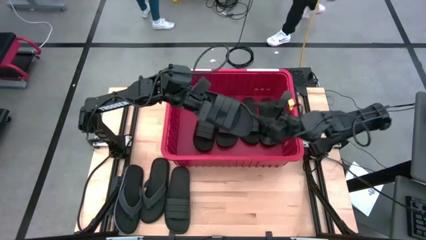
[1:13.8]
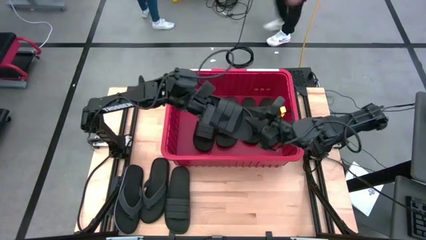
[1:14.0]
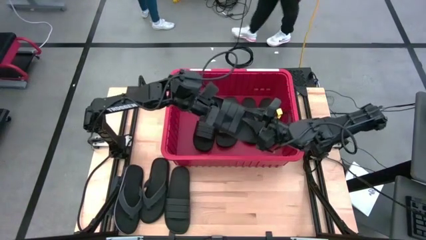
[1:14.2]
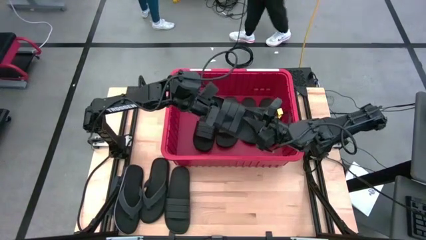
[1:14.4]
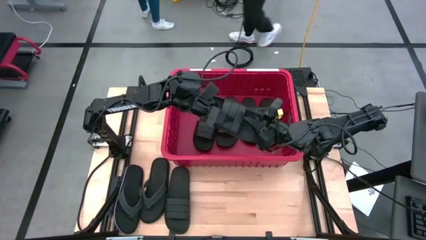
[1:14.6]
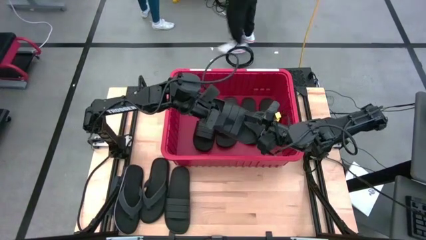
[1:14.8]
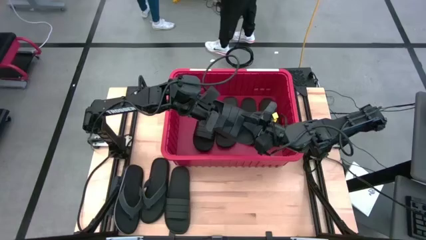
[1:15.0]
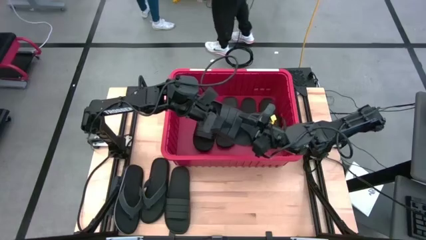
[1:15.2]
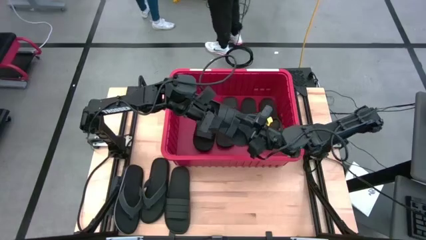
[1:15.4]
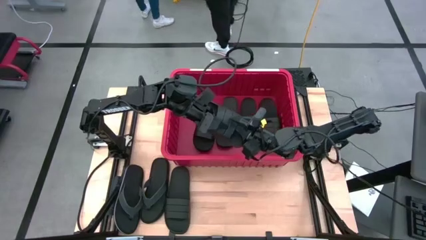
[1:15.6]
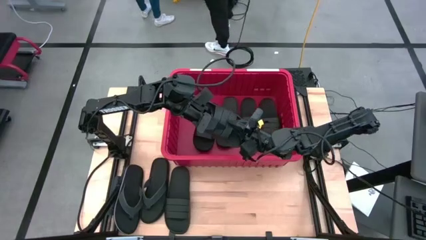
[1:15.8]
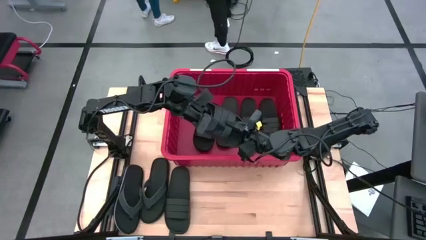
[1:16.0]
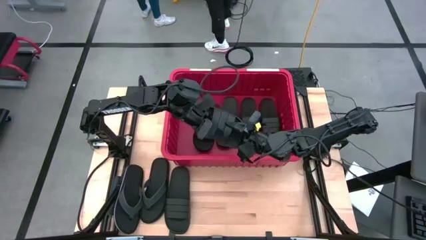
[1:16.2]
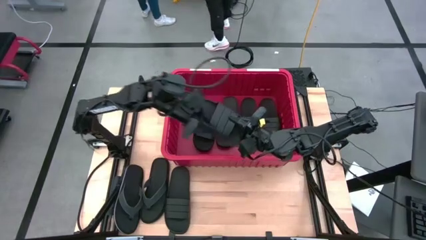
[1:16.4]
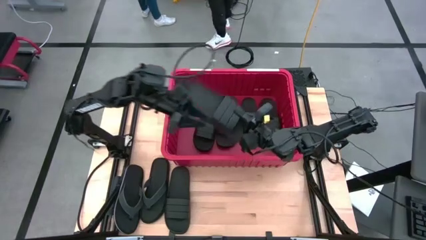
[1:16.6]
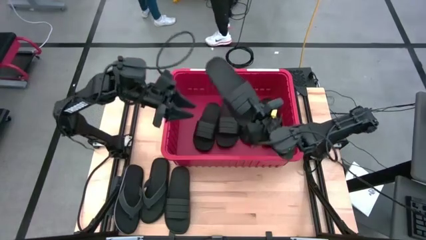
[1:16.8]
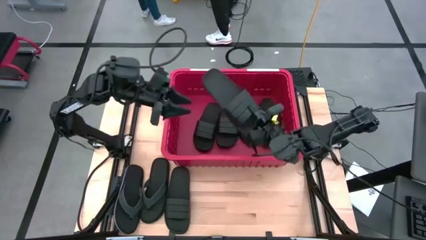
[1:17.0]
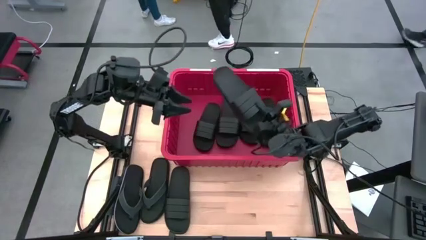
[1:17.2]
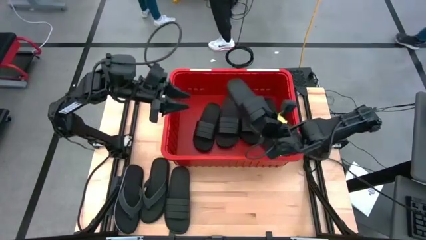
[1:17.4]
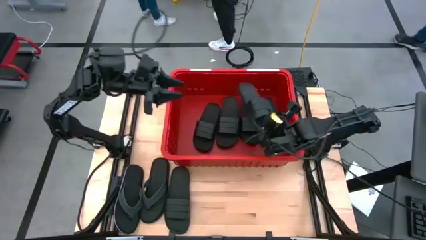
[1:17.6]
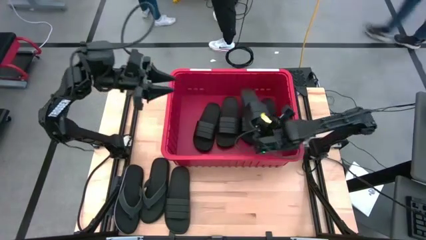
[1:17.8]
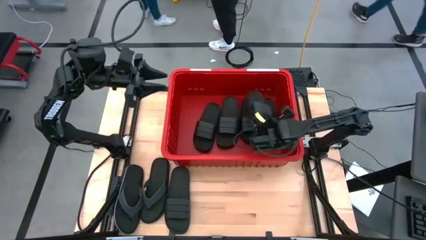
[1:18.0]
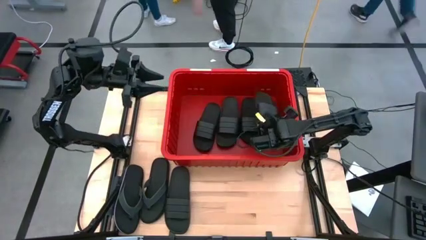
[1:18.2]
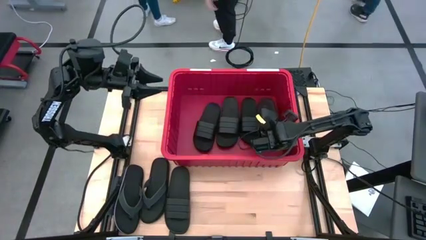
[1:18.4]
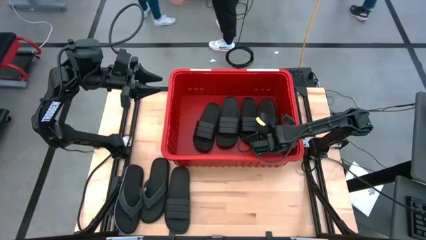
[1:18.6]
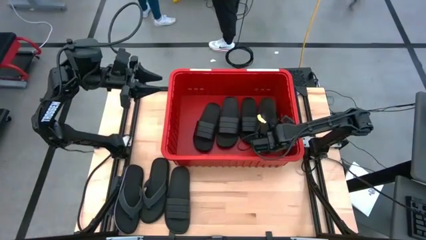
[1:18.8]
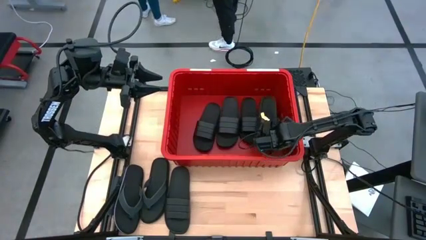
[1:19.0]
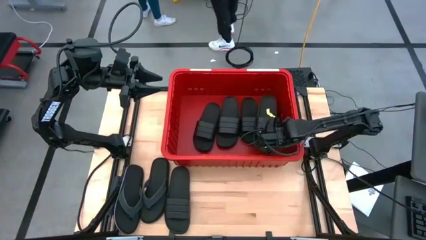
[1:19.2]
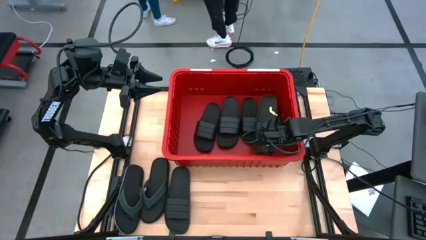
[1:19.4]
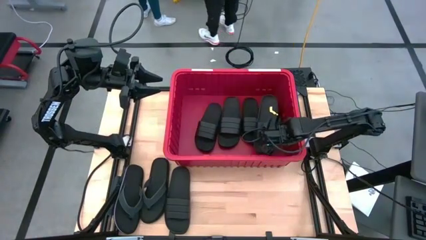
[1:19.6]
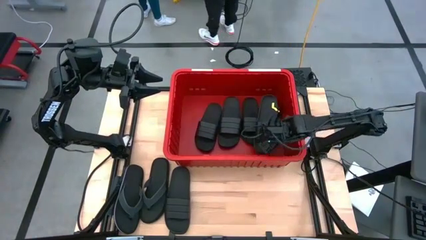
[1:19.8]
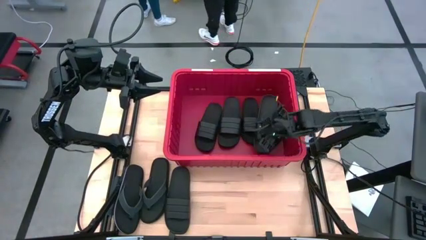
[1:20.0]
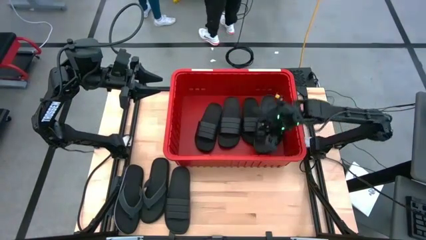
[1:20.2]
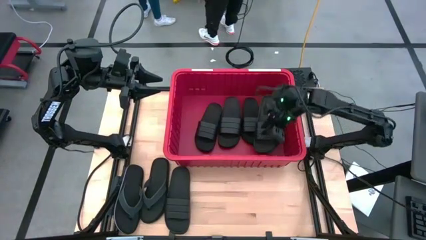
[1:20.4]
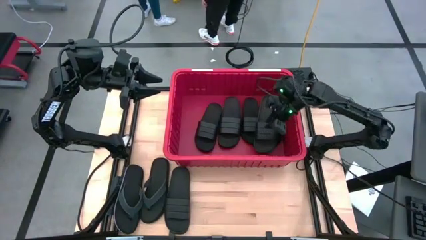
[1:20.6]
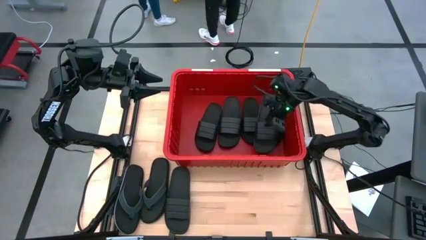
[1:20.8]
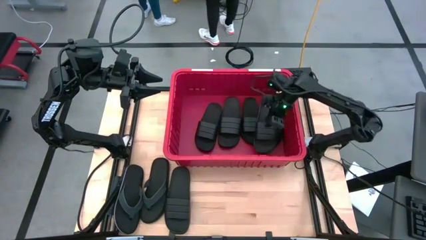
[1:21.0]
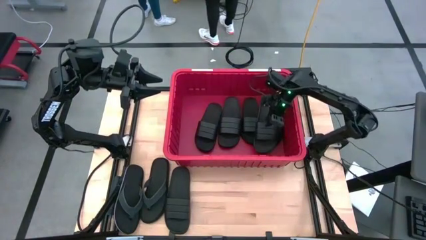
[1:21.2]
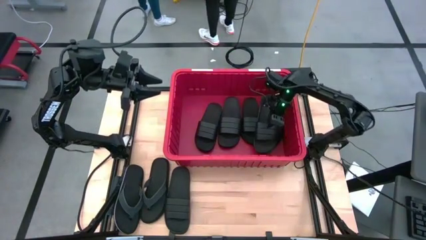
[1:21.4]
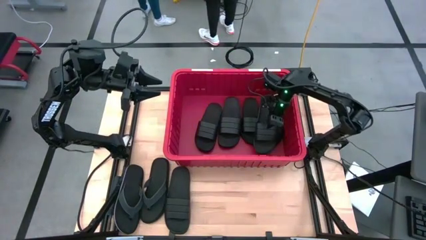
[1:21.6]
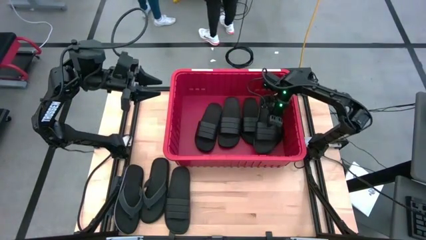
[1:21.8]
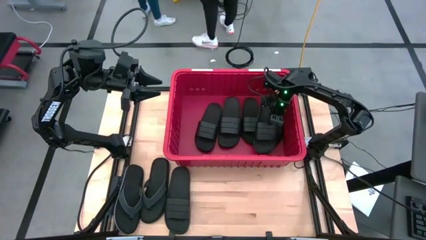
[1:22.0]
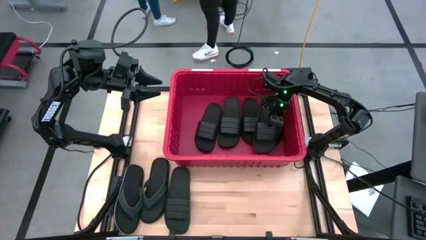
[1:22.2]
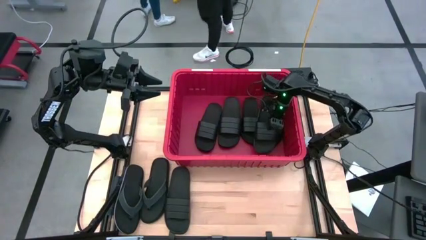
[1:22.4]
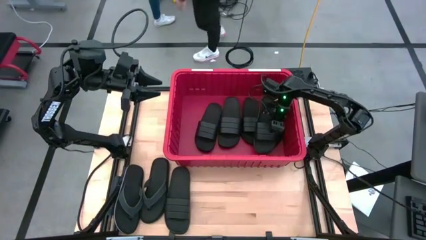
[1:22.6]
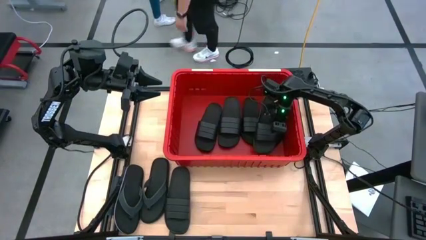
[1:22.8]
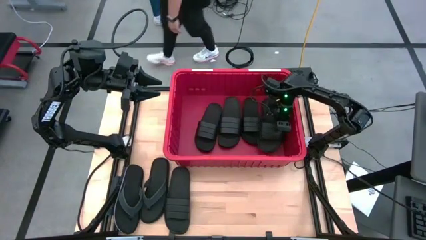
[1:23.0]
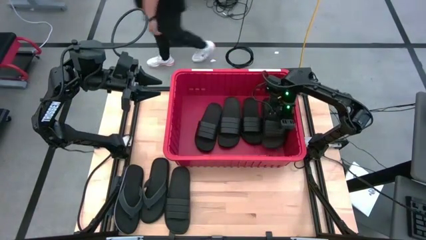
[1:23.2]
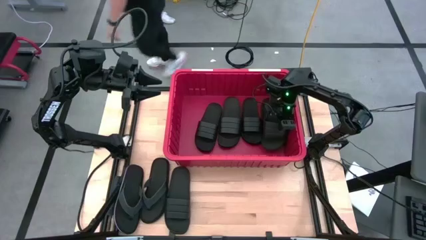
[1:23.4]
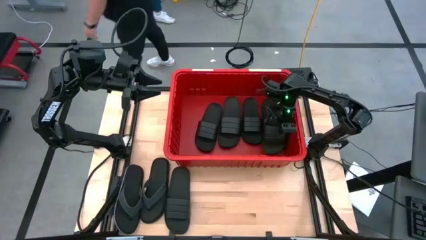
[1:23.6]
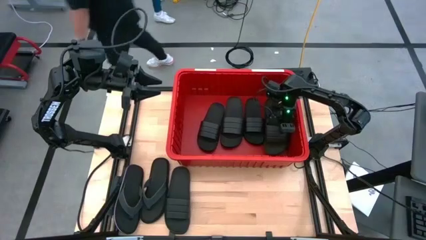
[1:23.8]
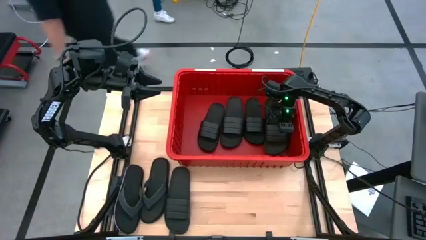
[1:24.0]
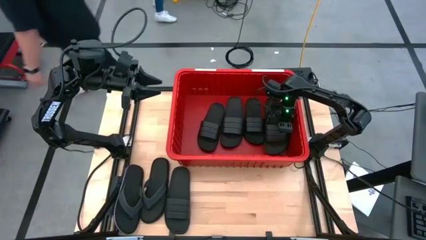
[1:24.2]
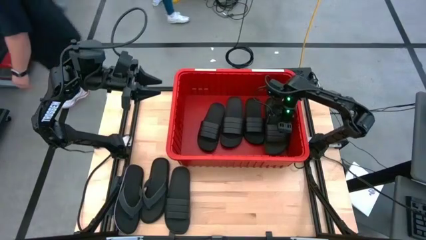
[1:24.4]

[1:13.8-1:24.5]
Task: Pick and place slides into bin
Put the black slide into the red container

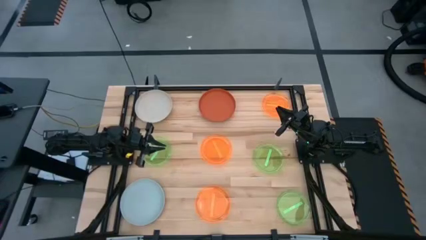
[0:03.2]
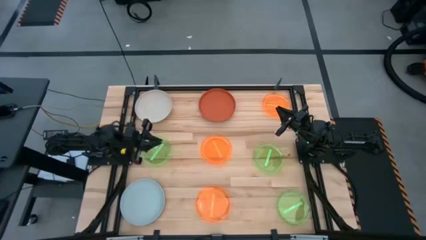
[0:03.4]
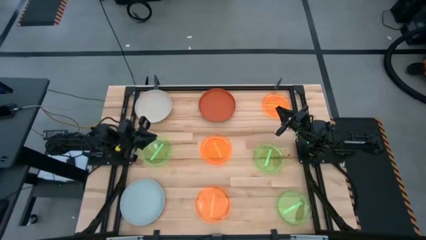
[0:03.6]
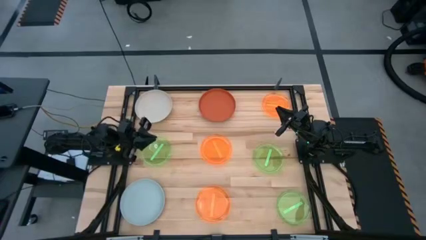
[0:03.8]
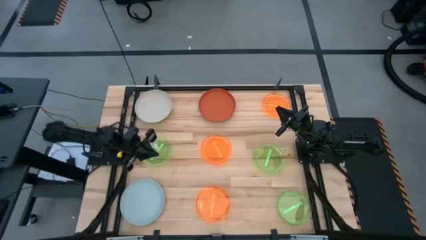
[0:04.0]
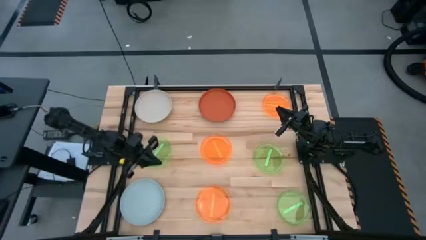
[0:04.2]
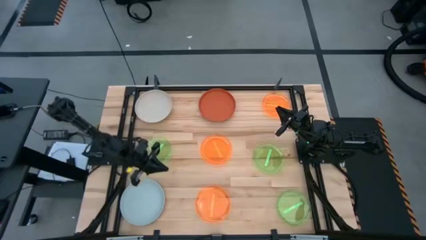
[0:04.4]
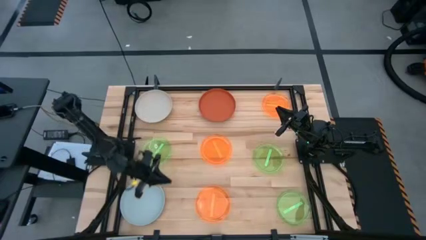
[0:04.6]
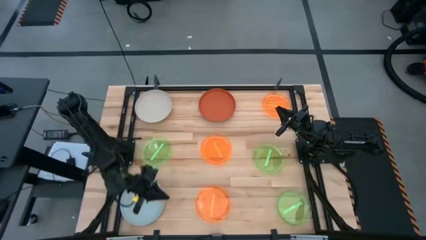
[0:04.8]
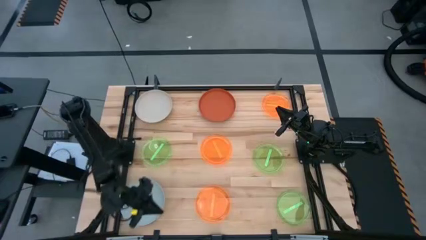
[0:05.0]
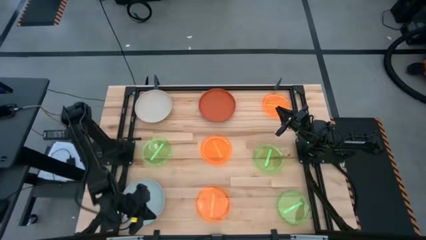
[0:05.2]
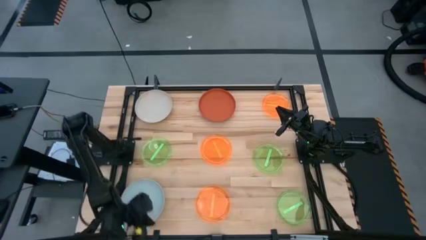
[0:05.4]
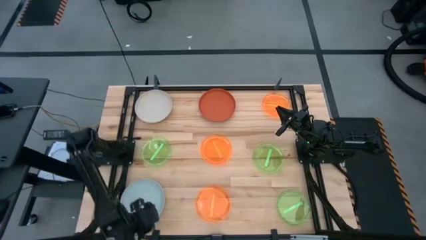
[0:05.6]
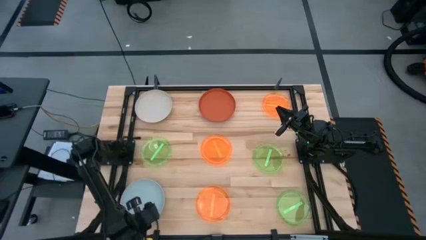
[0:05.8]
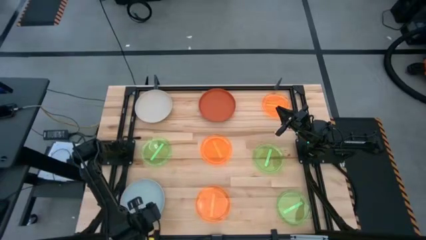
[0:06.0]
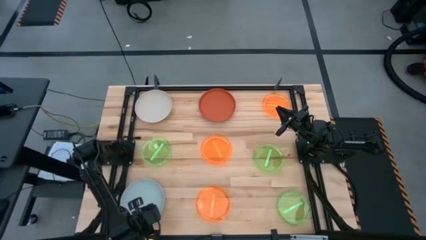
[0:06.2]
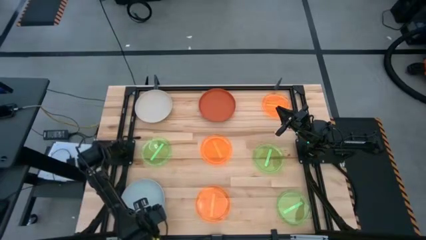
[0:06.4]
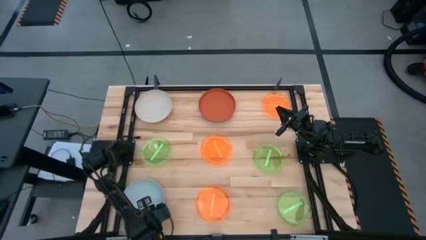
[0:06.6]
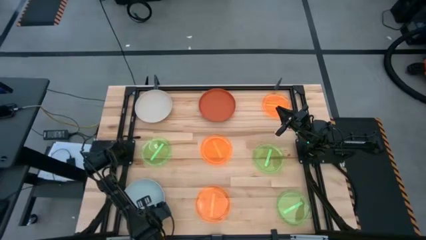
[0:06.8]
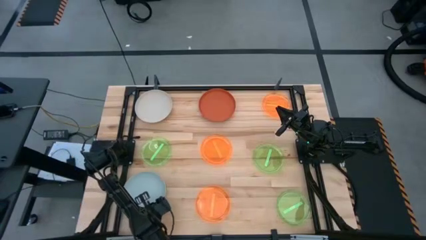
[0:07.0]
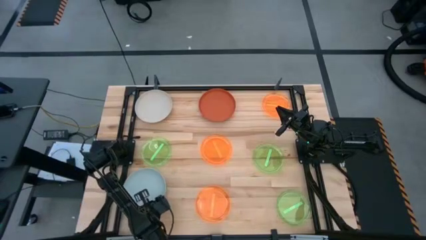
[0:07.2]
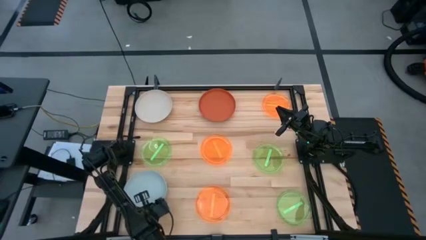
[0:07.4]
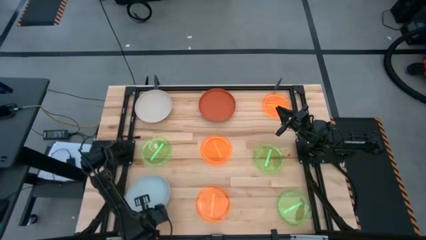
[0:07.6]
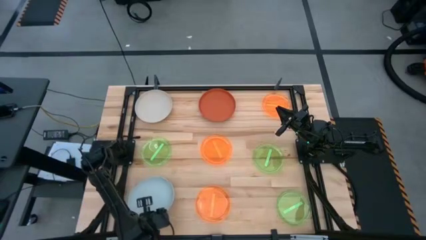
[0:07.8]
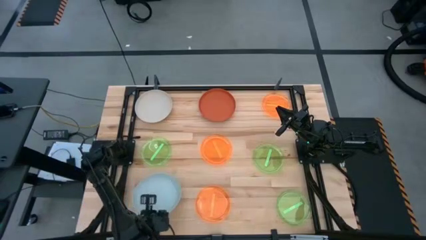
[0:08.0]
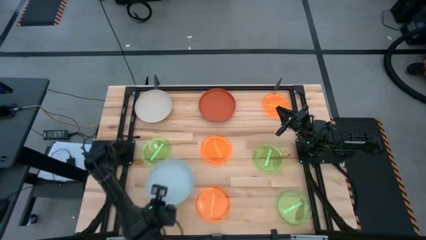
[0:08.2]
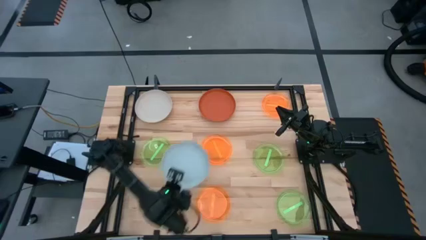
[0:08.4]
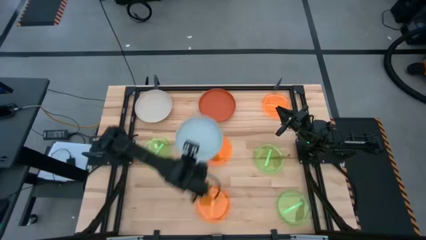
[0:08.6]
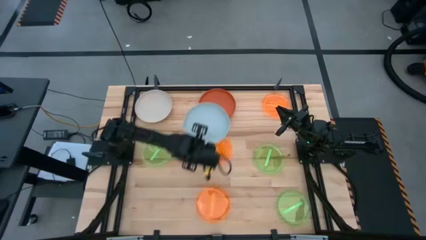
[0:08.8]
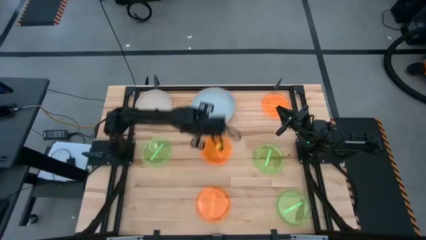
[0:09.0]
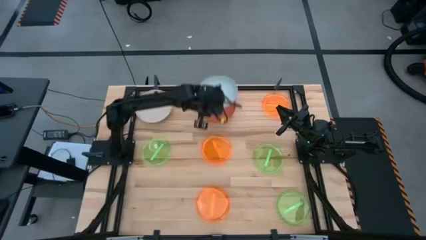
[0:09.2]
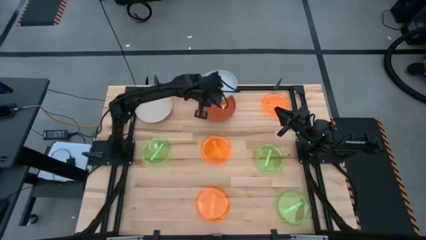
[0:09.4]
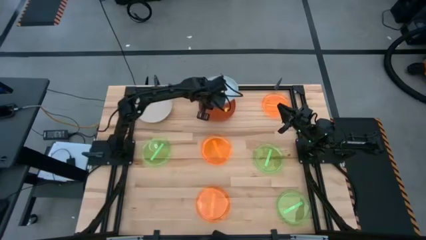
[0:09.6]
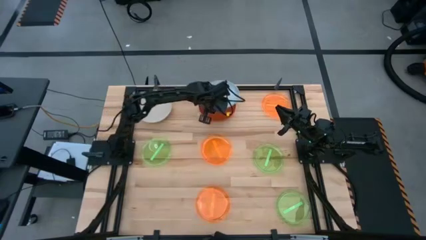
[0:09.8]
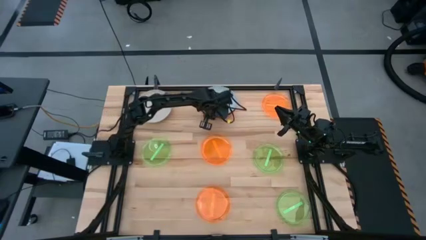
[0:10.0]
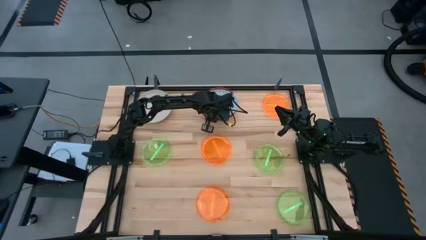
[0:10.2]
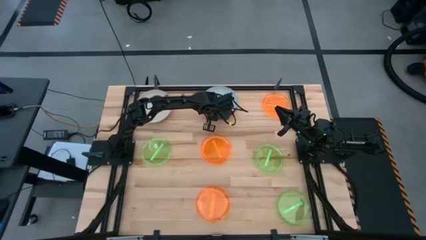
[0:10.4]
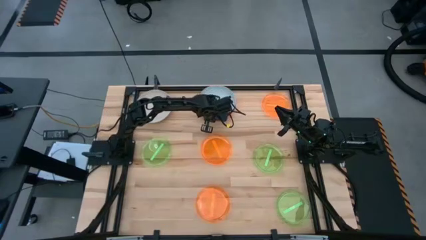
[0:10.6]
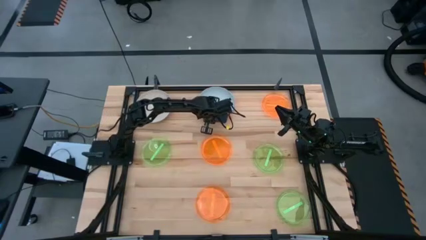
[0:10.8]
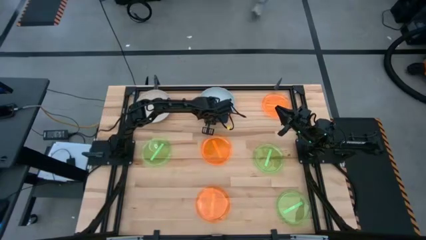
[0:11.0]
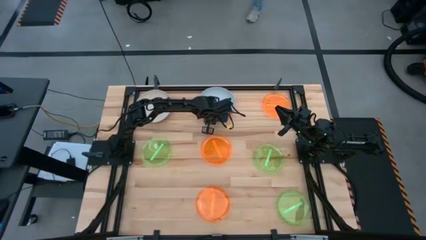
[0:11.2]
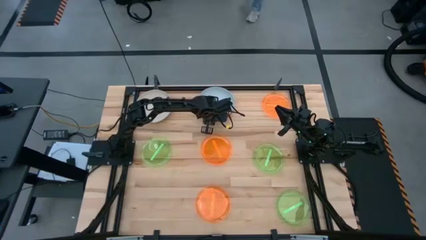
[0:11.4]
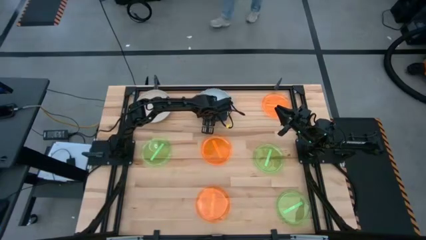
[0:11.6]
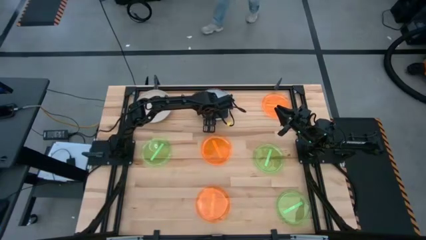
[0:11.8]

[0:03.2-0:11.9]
Task: Stack plastic plates
Stack the light blue plate on top of the dark orange plate
